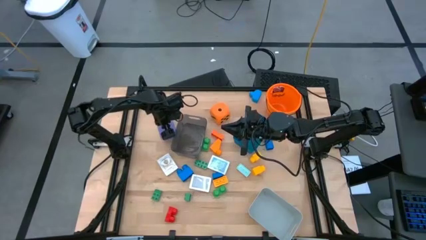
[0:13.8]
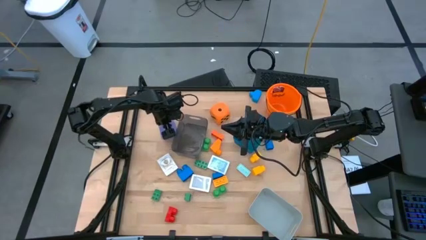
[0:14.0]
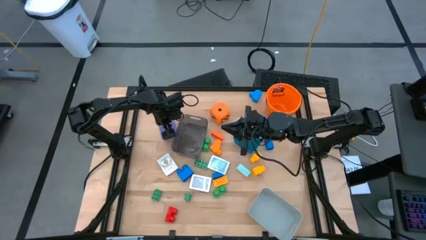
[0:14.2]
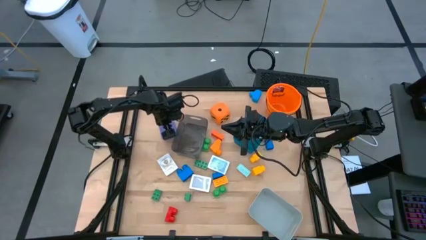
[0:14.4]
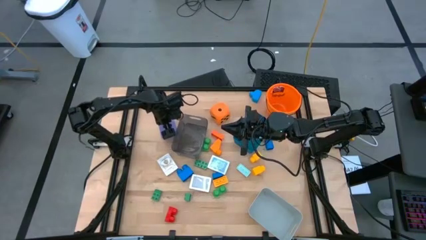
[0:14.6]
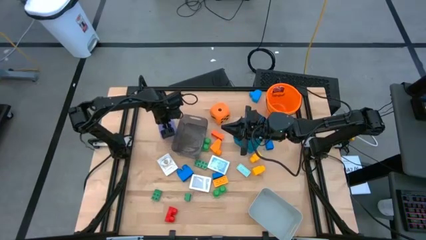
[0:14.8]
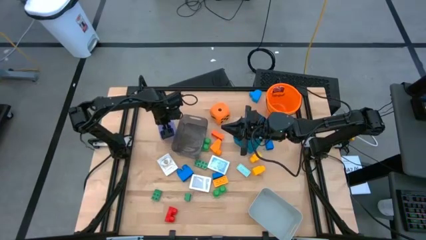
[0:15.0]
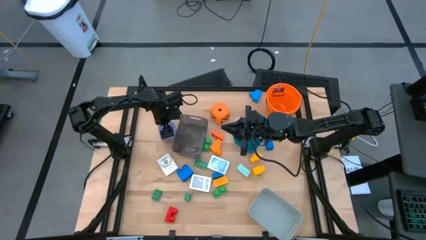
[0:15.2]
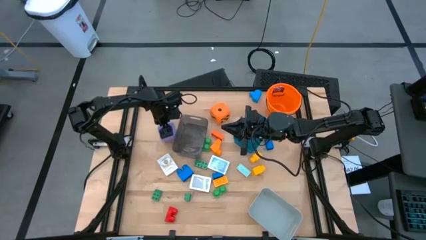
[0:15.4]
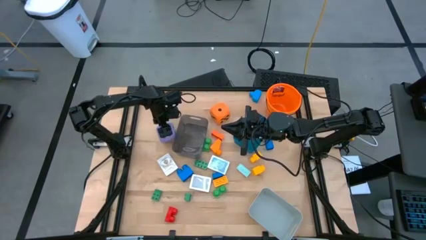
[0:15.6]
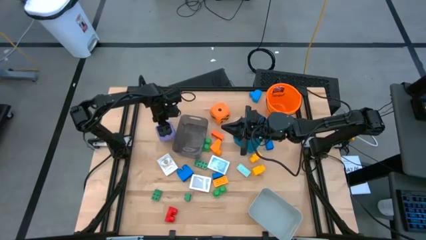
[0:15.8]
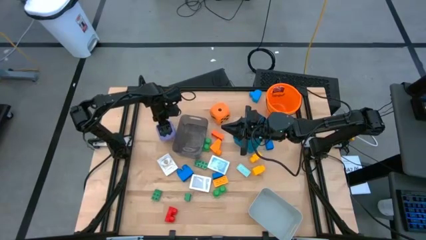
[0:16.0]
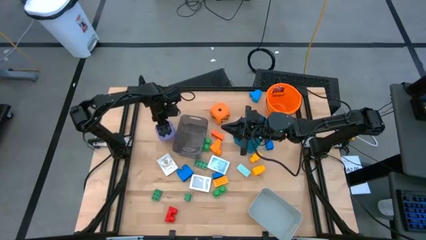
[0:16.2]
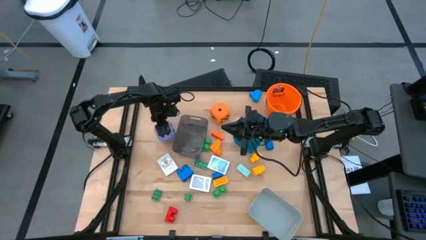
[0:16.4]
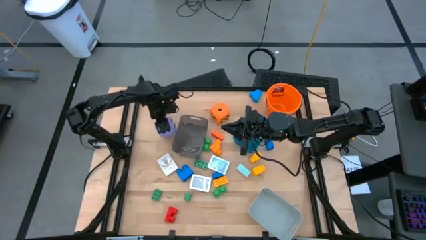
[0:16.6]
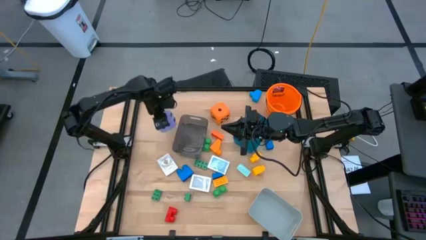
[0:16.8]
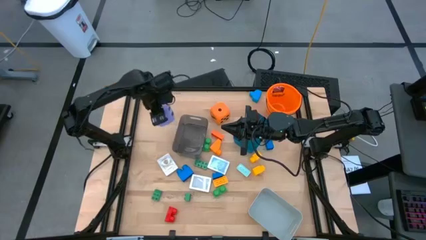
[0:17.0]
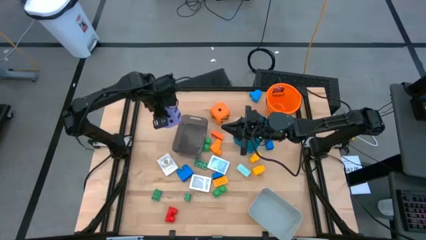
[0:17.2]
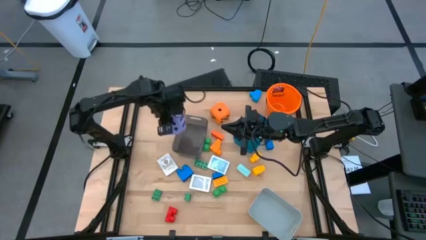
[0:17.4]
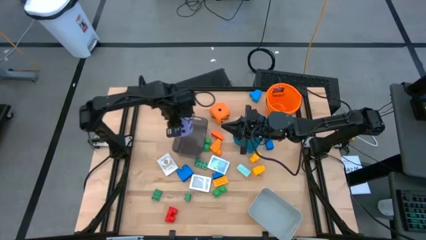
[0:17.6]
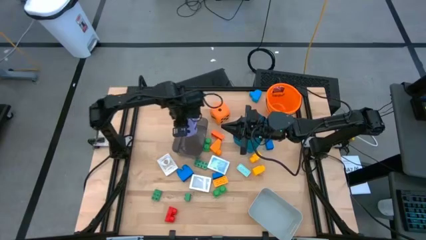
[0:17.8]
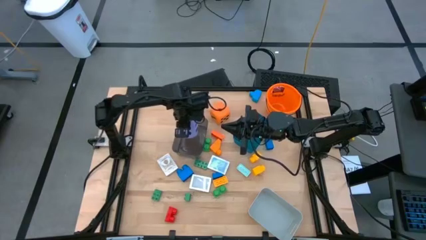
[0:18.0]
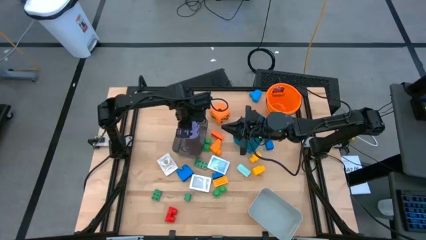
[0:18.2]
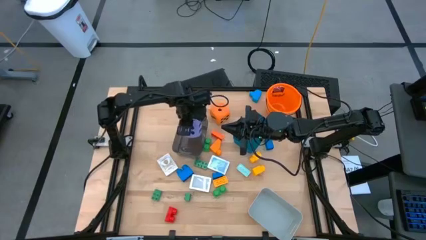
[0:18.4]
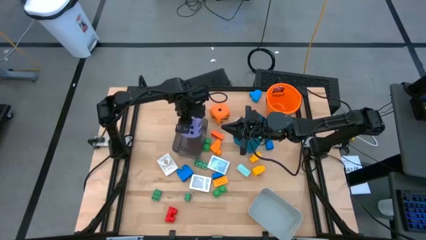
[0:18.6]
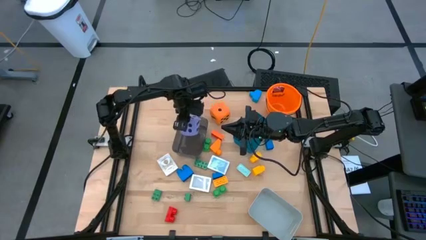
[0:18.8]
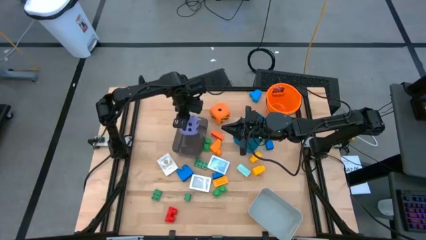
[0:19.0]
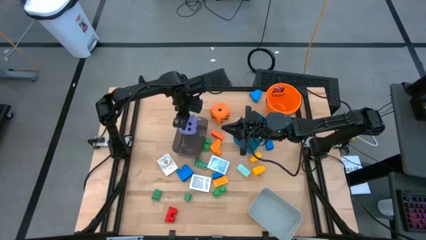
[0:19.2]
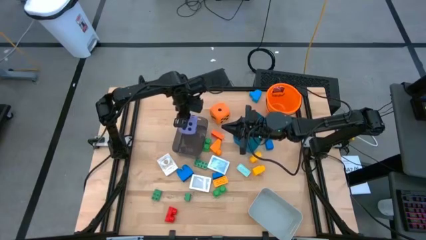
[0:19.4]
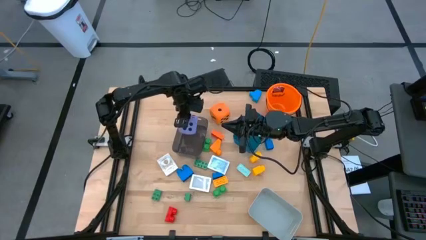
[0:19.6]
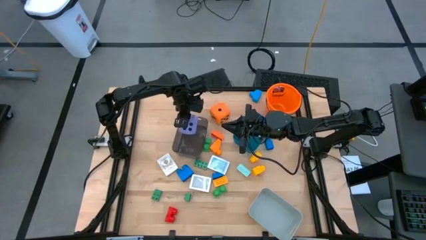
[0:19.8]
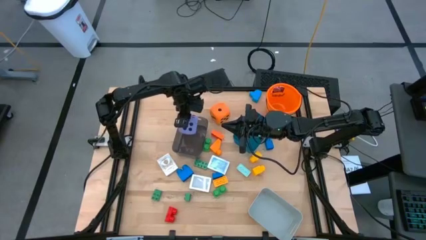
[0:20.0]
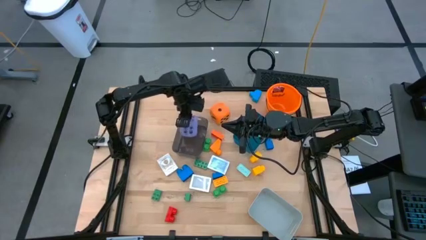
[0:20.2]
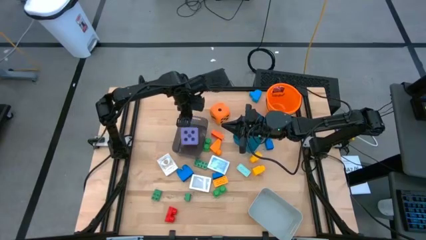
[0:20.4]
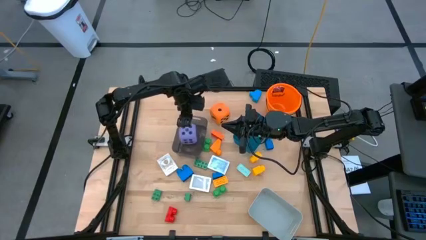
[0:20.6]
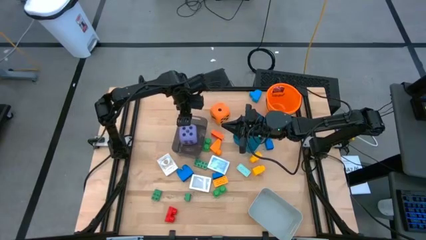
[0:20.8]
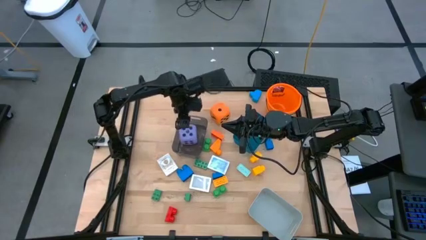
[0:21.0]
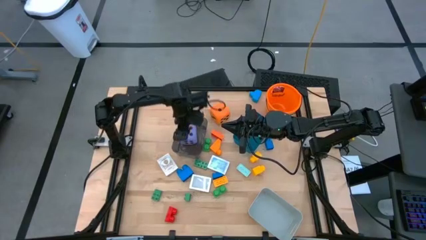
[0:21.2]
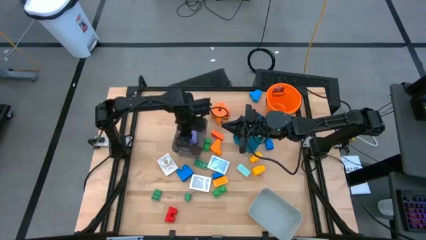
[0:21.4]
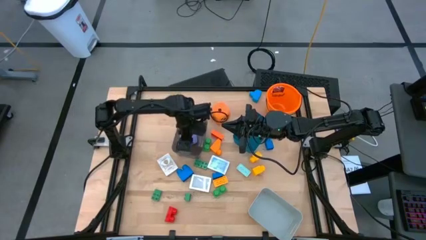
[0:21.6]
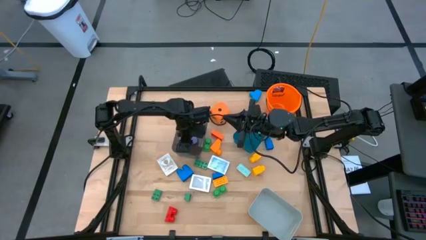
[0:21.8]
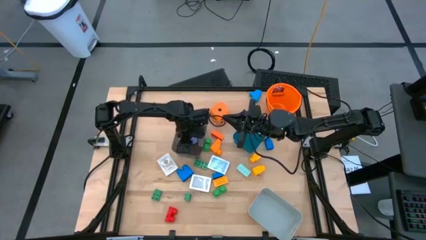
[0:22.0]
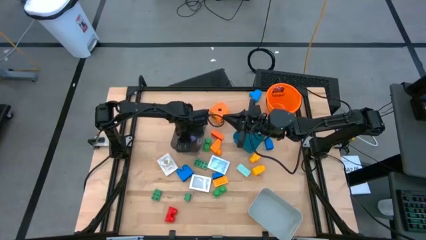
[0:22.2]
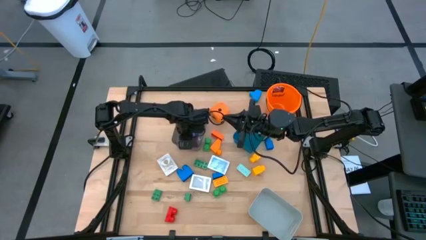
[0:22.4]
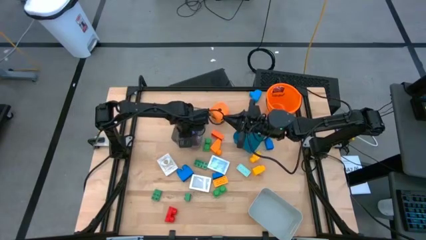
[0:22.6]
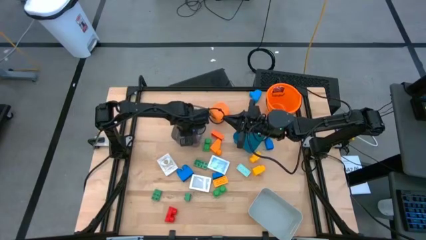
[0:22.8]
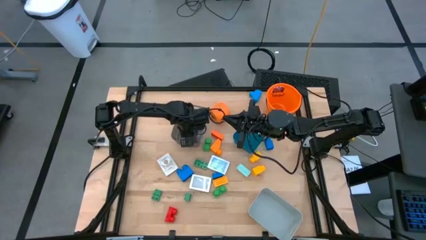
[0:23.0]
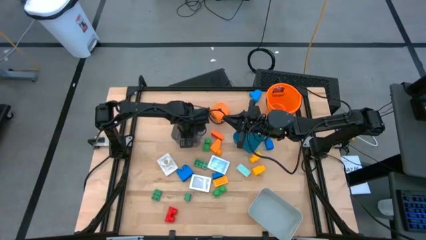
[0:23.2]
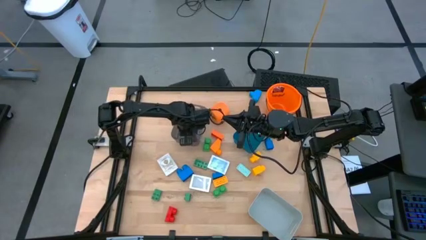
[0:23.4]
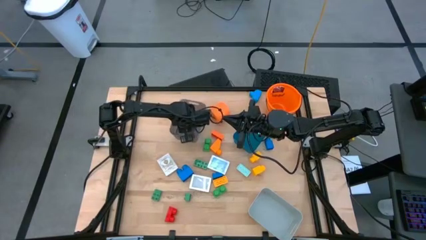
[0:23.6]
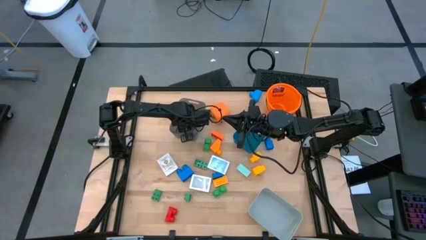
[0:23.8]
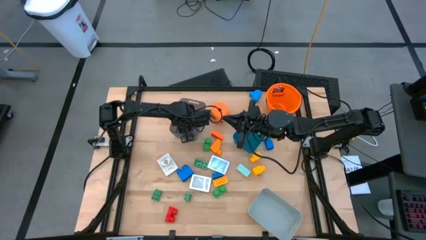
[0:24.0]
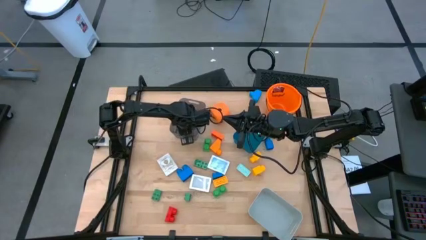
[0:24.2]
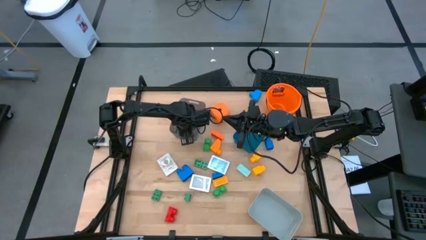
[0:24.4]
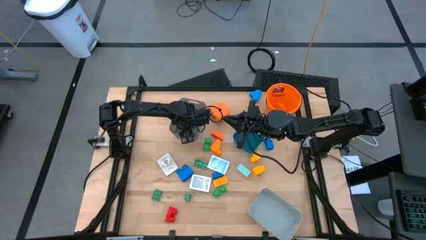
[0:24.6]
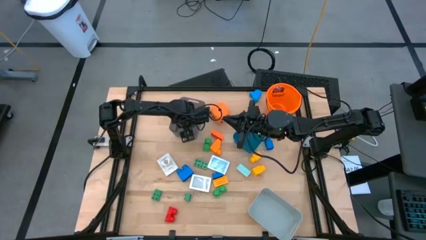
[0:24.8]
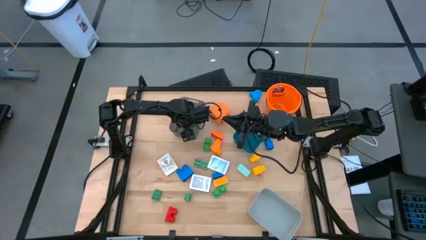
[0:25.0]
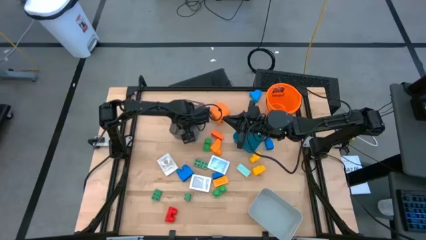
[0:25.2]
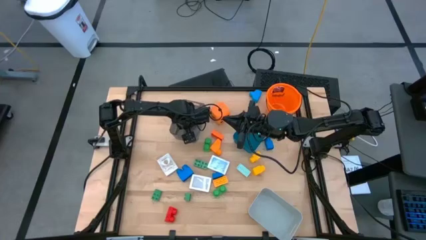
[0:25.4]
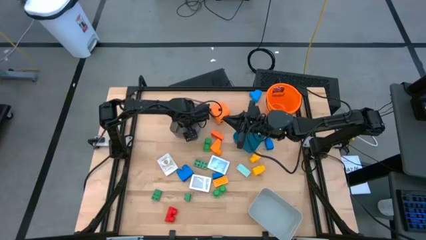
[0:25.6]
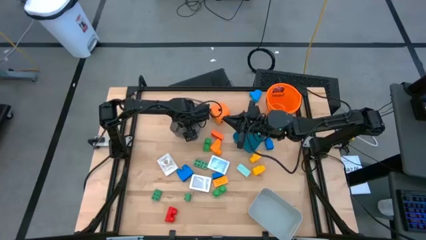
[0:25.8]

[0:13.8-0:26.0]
Task: Pick & Place Toys
Put the purple dice into the black bin

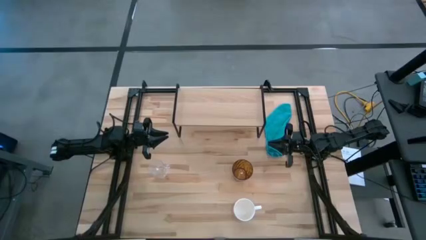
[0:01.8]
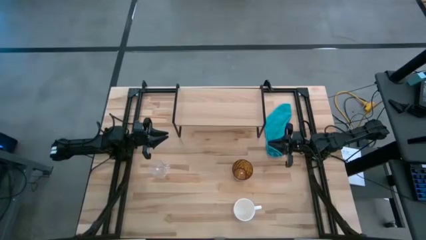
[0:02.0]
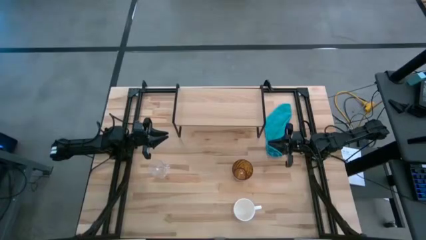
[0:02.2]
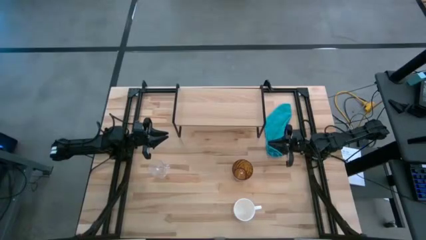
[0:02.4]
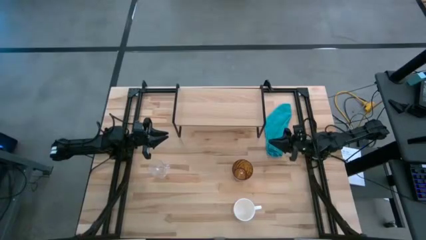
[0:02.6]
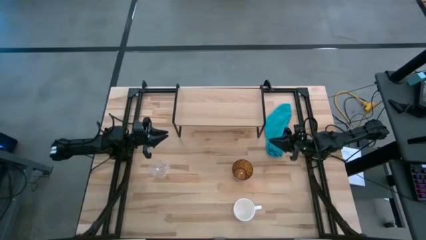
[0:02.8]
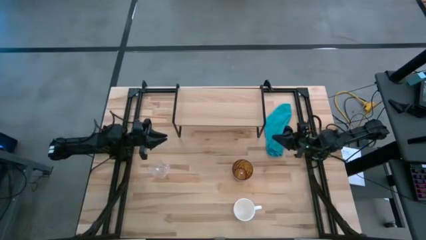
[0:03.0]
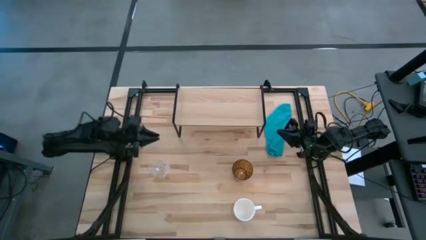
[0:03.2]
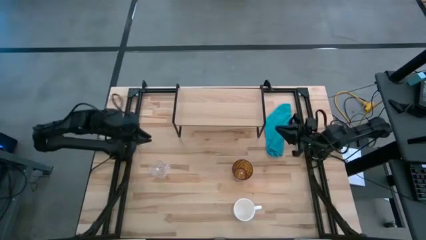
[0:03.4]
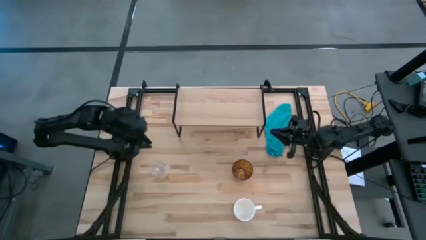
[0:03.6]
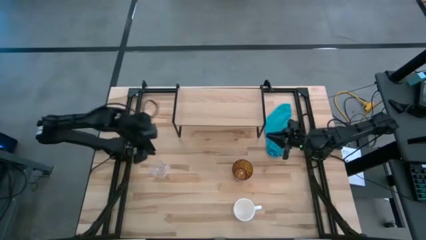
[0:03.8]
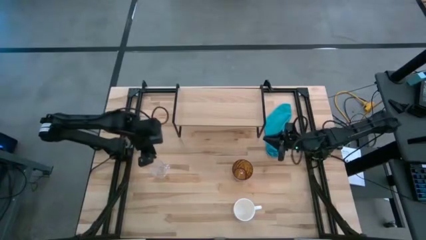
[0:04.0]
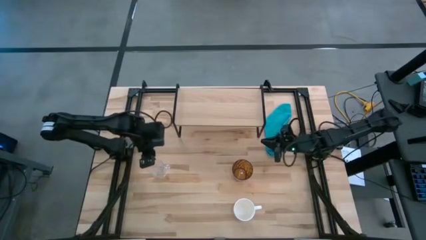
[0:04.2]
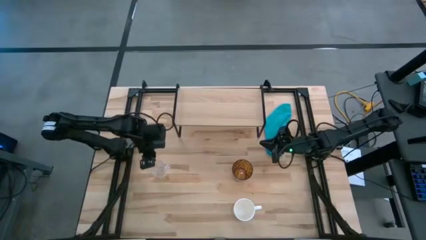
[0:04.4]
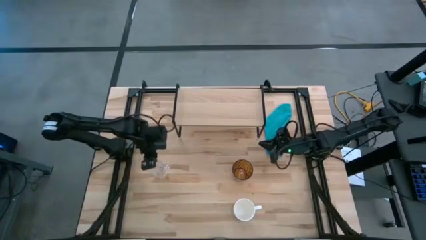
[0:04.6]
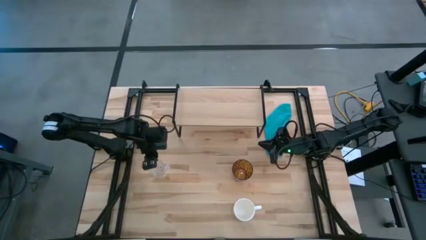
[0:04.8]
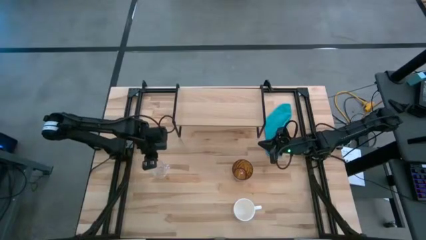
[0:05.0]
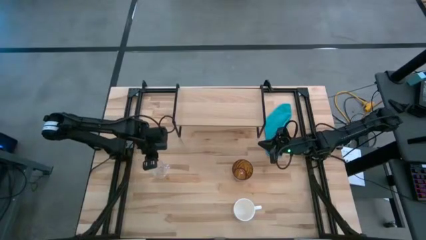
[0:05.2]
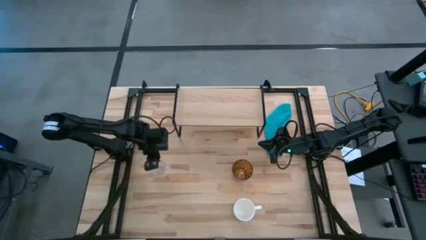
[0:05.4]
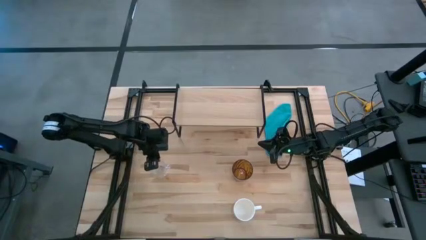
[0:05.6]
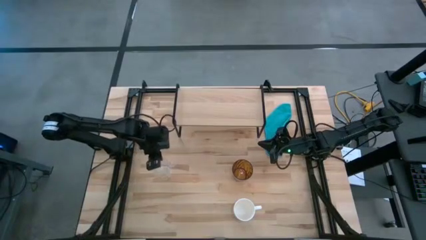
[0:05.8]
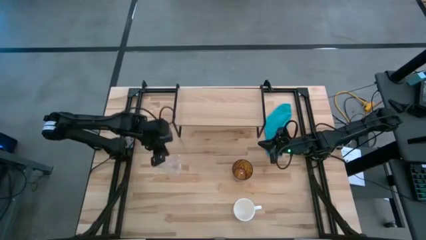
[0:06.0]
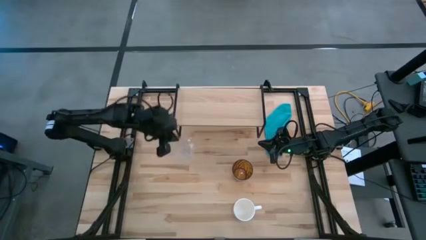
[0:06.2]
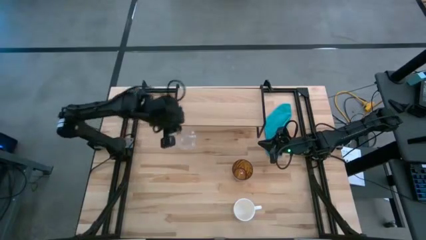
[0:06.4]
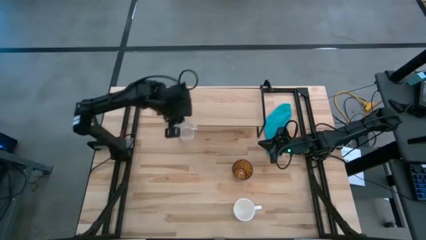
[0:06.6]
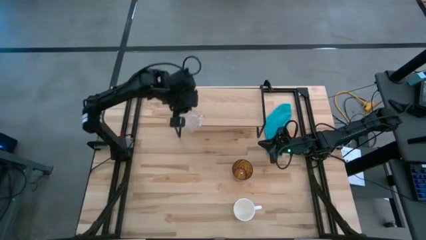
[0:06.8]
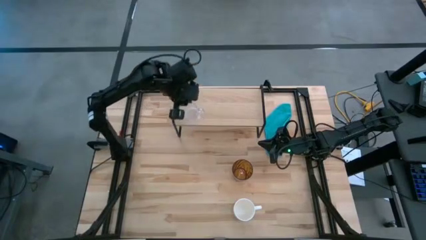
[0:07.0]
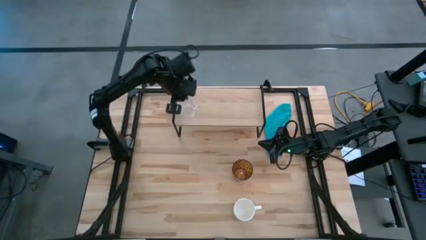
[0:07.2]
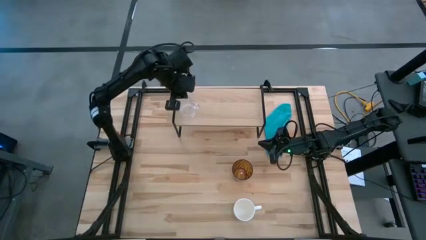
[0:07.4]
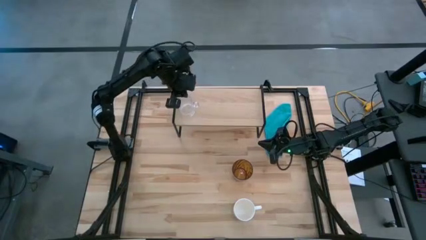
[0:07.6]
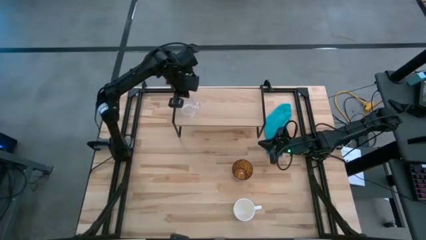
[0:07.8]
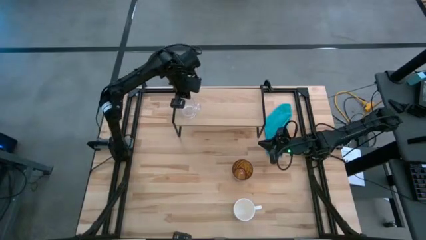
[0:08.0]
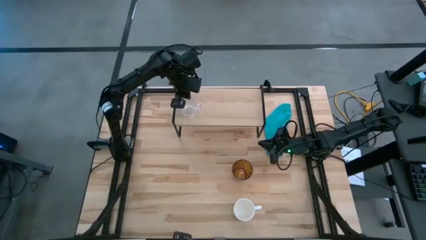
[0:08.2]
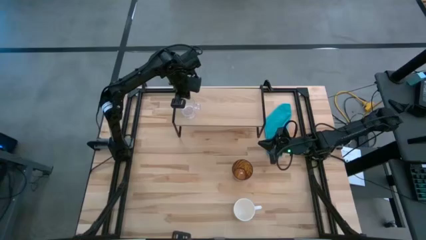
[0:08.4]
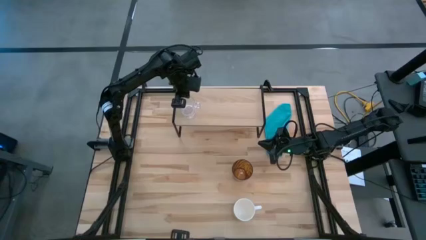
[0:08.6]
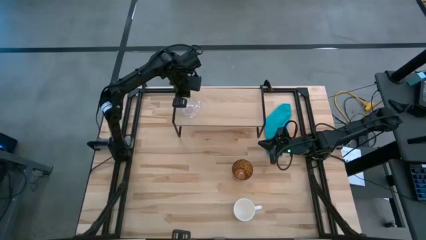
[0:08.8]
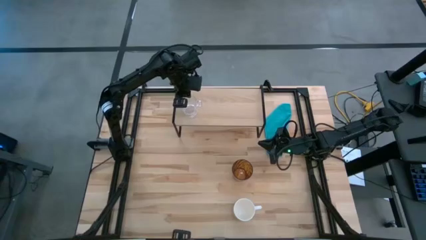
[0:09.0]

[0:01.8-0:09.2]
Task: Stack small to large cups/mugs on shelf
Put the transparent mug on the shelf
